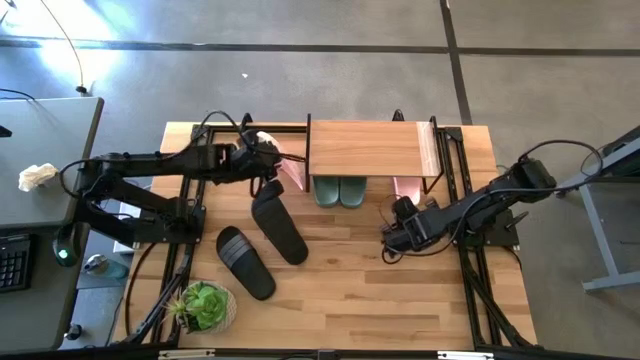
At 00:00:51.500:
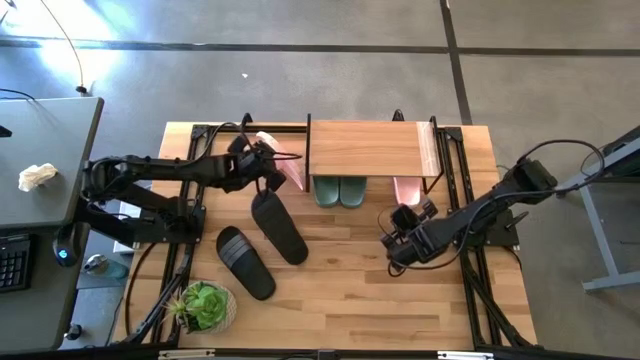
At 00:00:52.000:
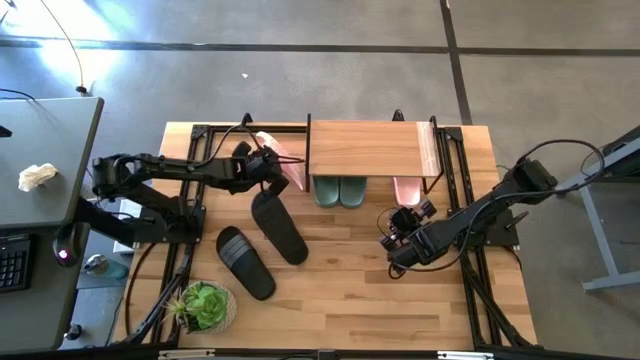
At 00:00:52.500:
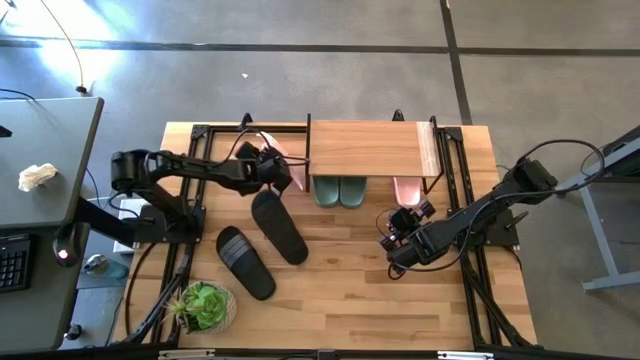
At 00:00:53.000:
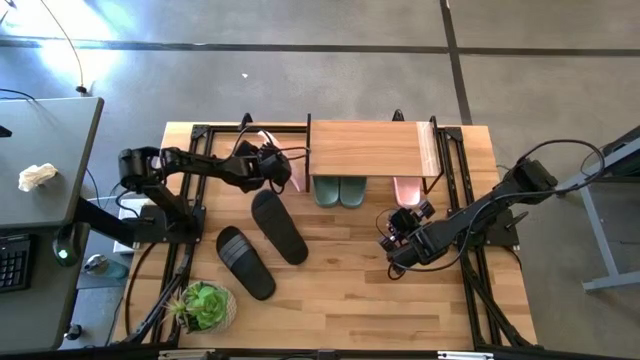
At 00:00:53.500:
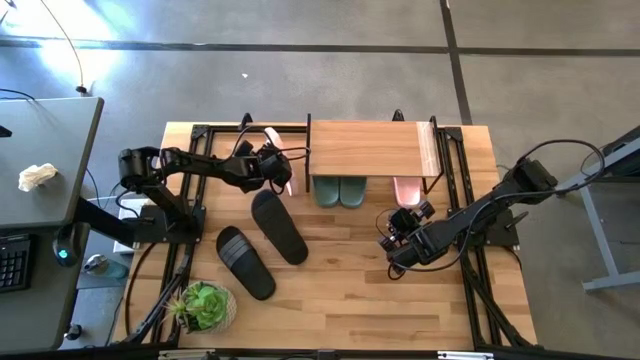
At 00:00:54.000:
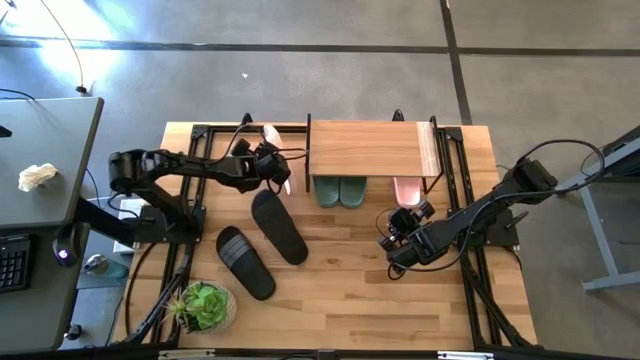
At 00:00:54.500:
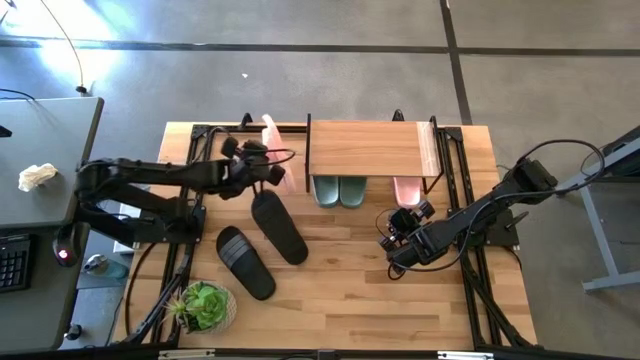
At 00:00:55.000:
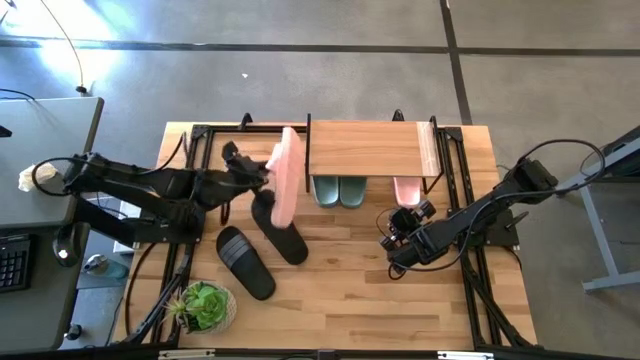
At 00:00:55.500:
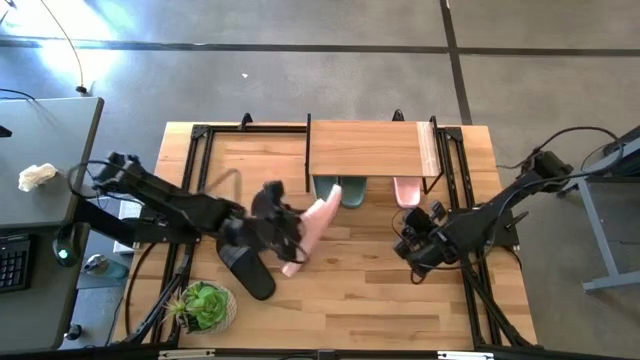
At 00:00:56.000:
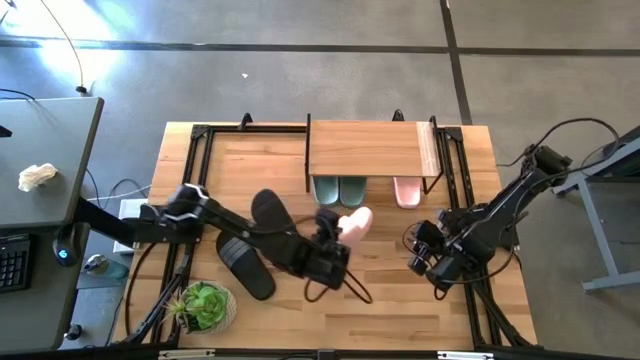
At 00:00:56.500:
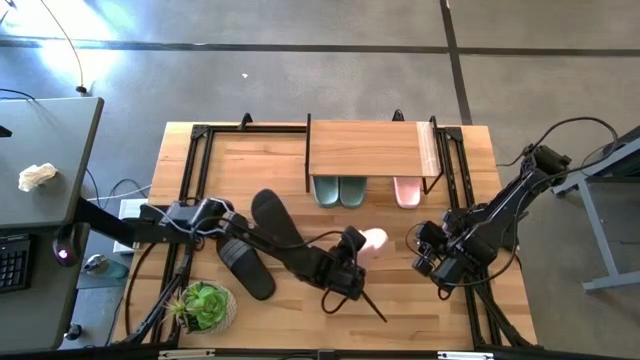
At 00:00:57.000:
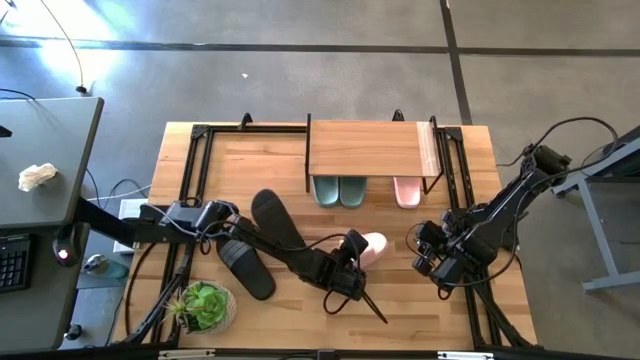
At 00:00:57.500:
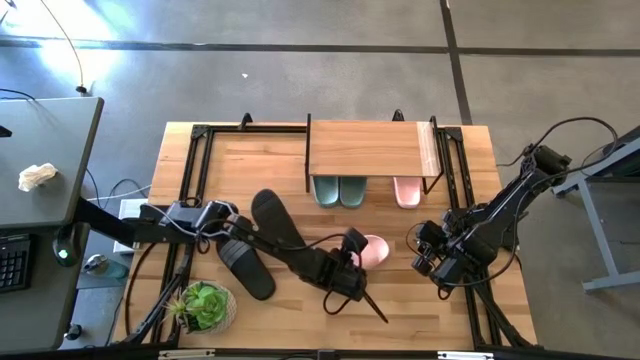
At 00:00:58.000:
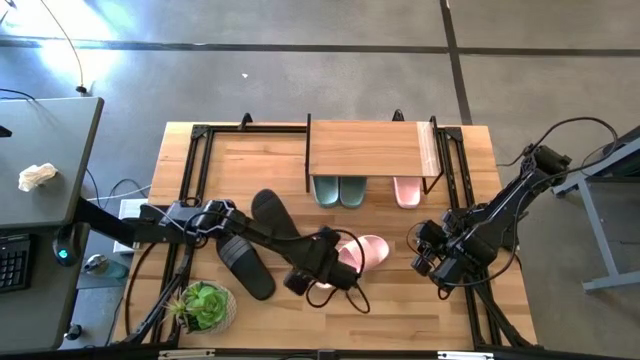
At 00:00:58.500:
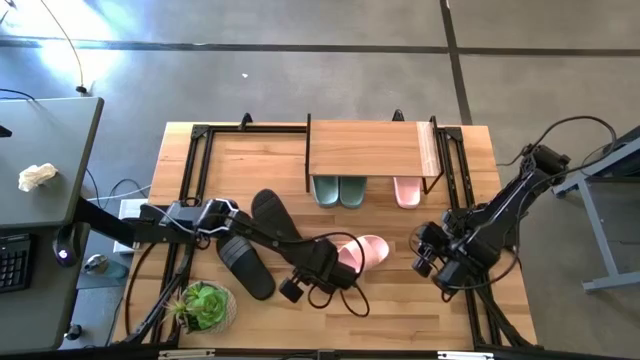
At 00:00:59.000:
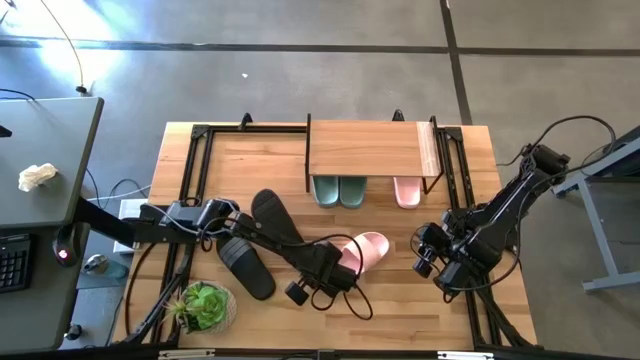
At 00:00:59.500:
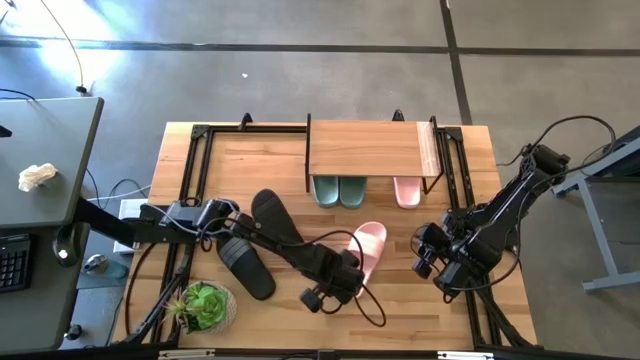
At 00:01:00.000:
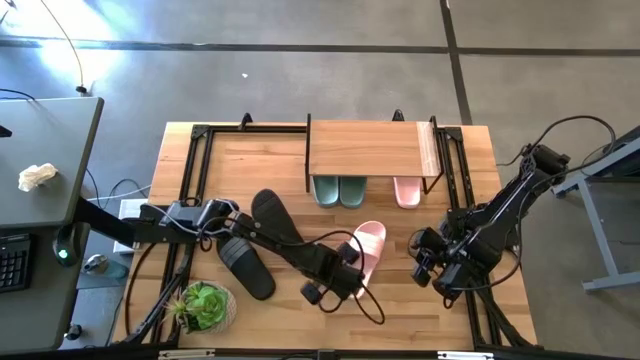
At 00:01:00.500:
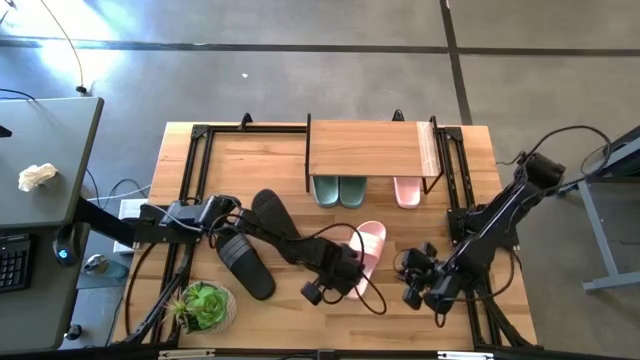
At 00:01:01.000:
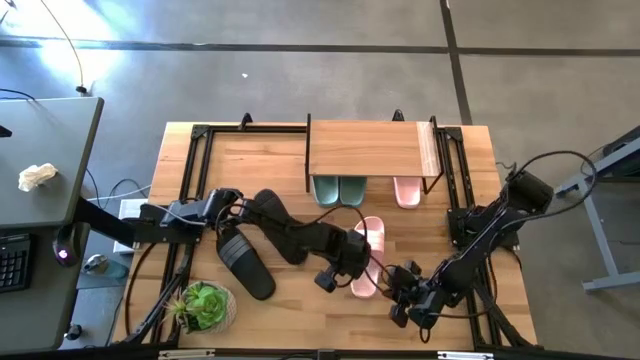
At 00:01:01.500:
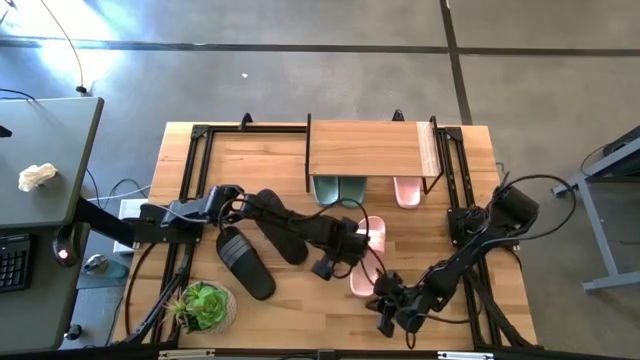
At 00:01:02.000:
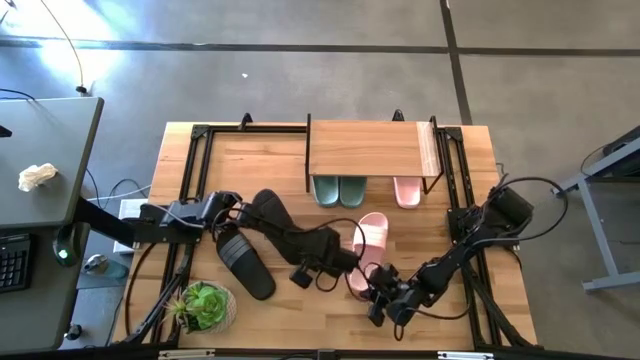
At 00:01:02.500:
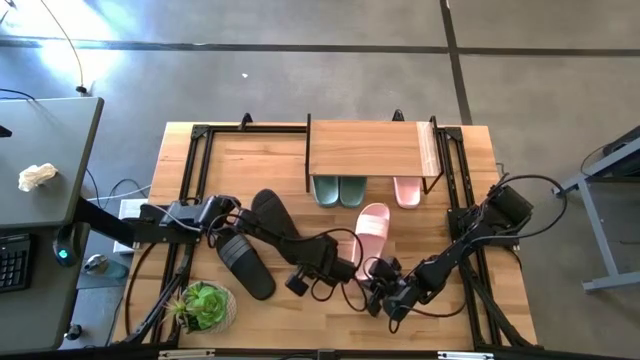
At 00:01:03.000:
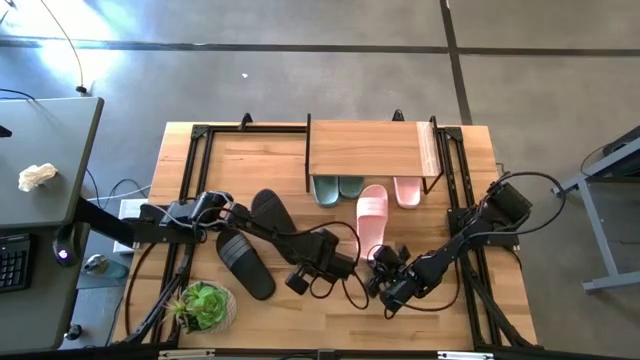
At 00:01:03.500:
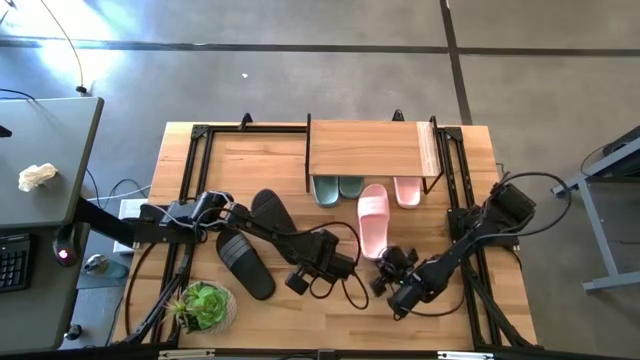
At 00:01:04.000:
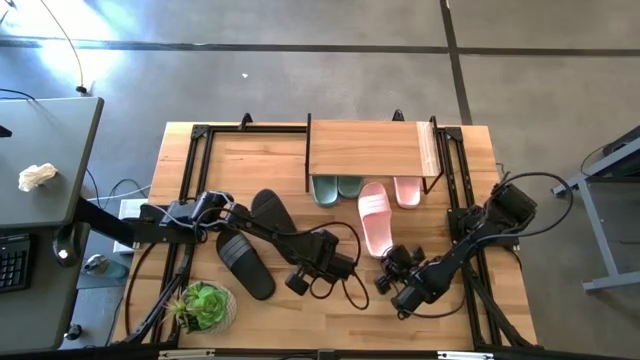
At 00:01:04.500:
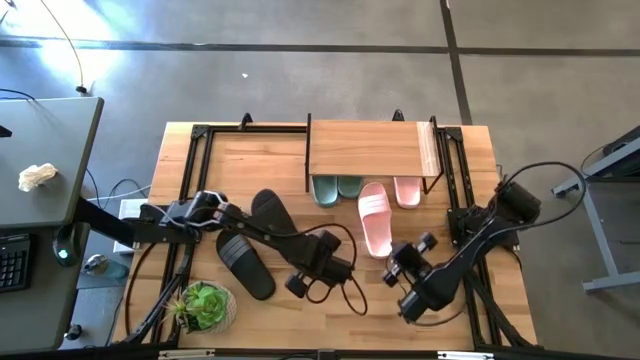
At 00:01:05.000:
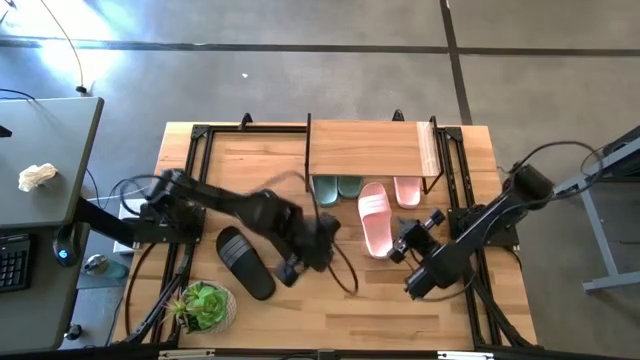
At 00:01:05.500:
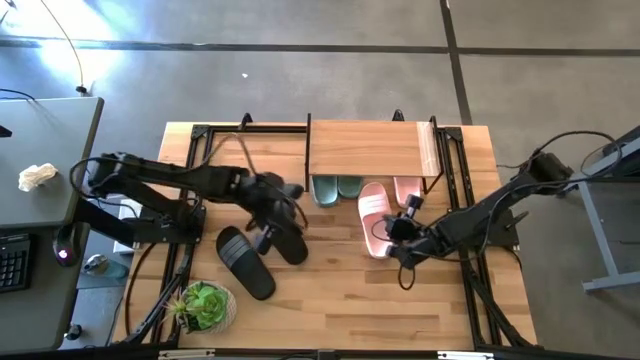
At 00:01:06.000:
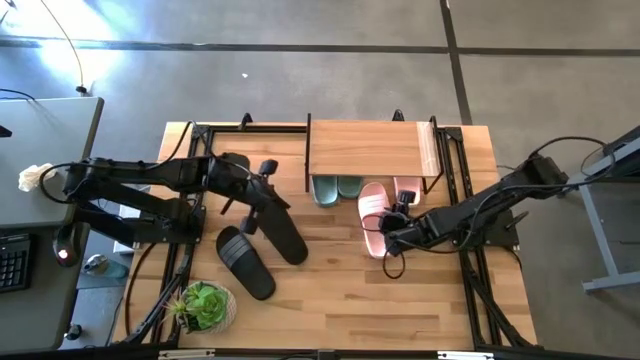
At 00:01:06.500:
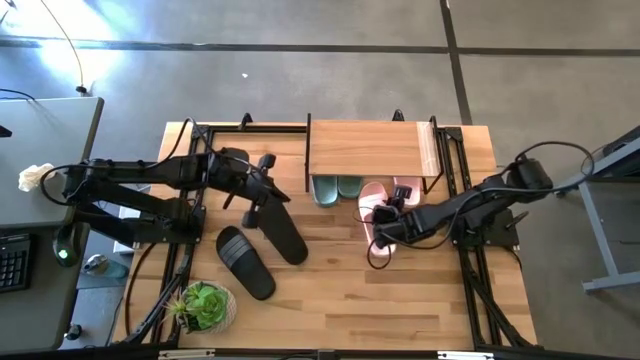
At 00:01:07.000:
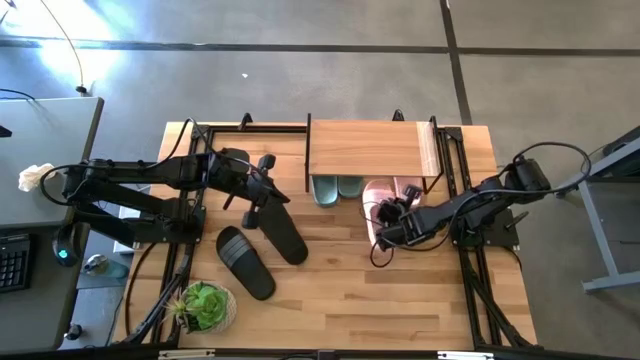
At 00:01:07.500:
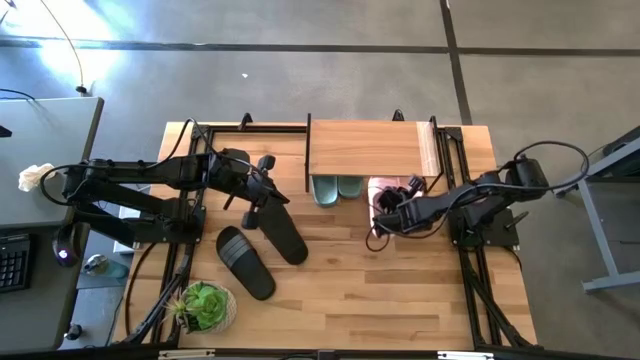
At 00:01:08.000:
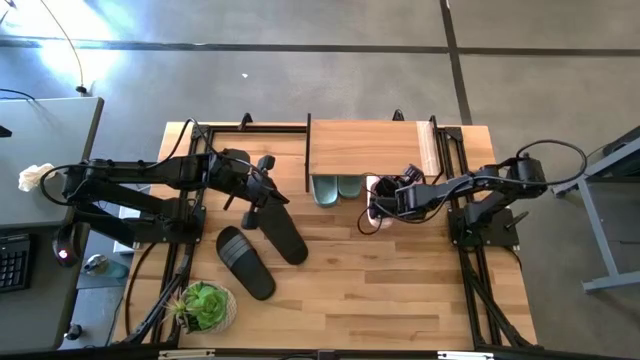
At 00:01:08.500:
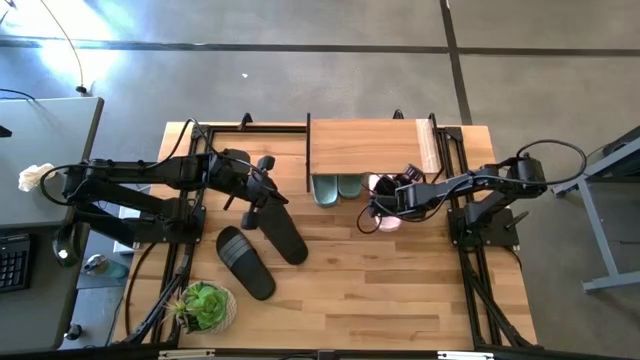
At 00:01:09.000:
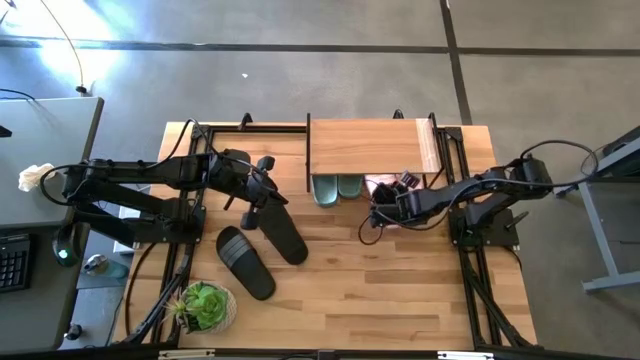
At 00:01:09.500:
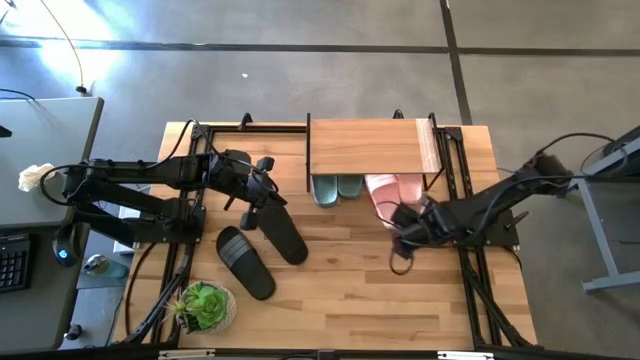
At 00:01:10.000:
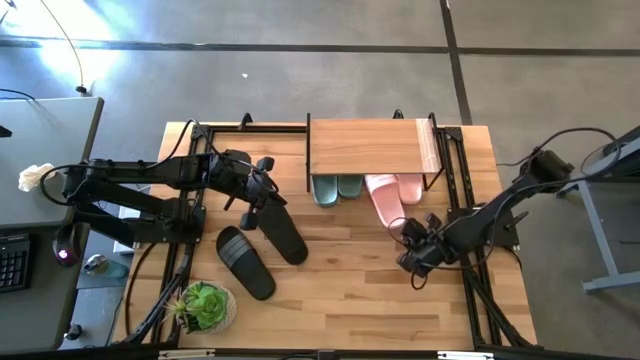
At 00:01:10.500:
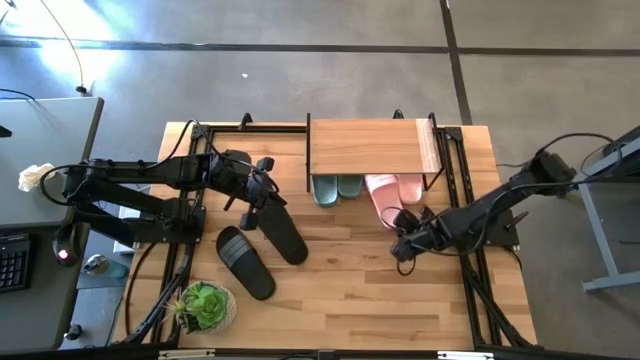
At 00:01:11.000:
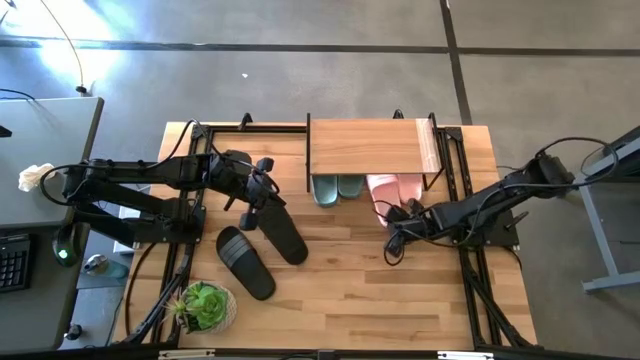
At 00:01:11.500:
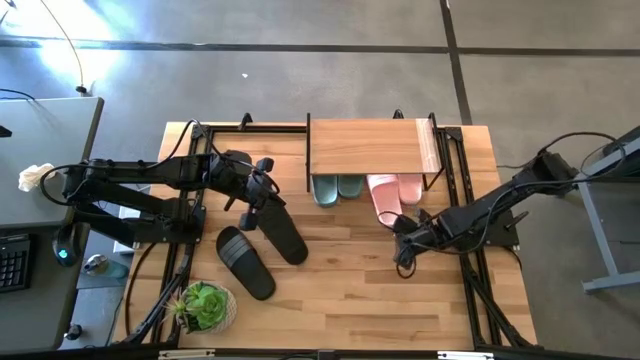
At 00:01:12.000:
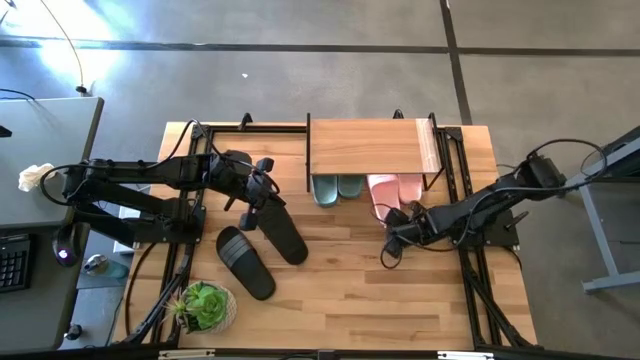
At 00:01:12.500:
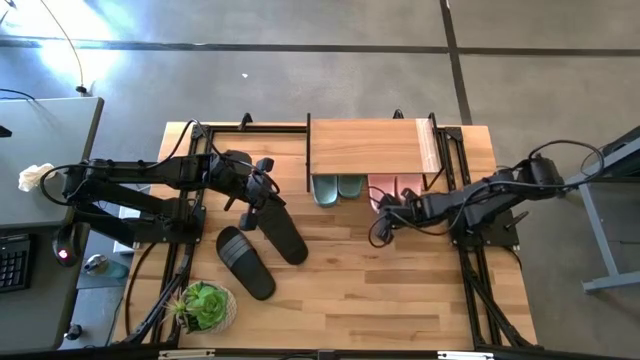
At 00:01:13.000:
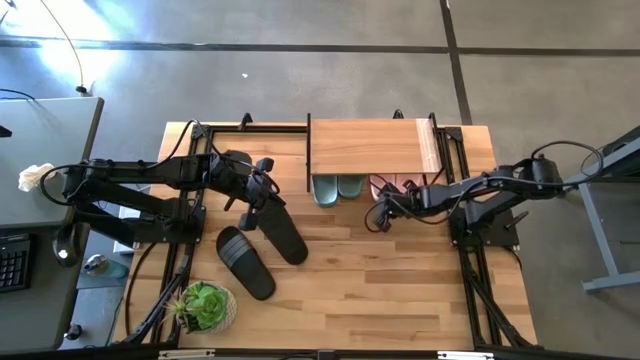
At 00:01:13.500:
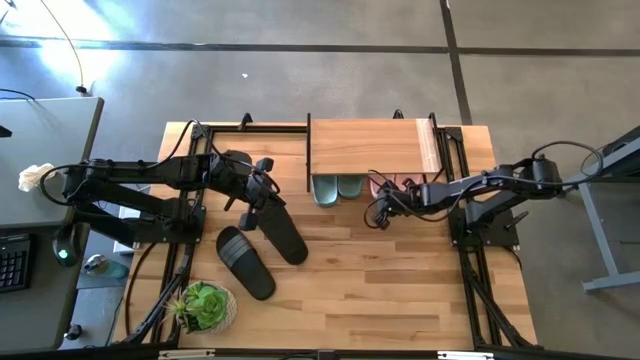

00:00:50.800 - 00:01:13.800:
Task: Pick and place slides into the shelf
Put the pink slide under the shelf
